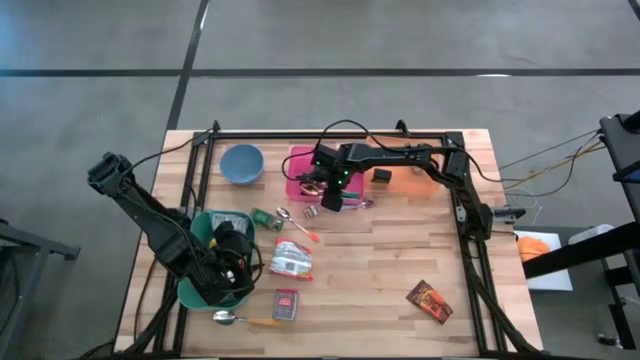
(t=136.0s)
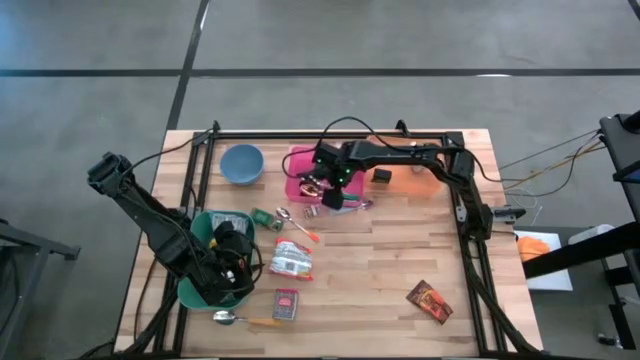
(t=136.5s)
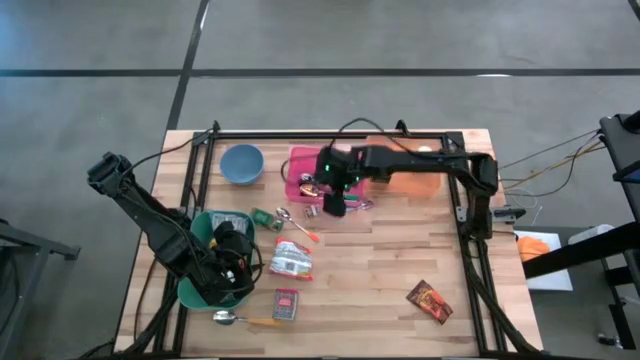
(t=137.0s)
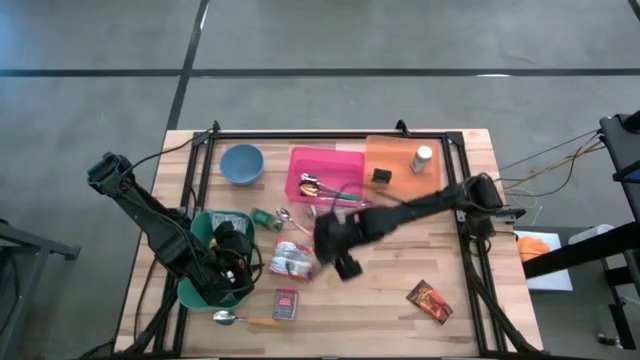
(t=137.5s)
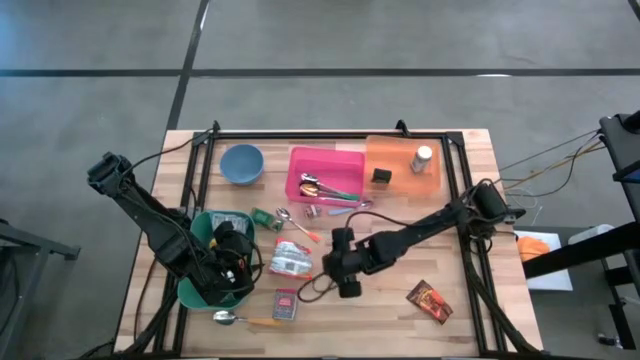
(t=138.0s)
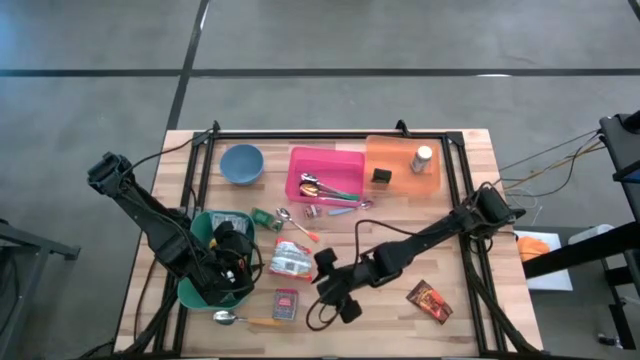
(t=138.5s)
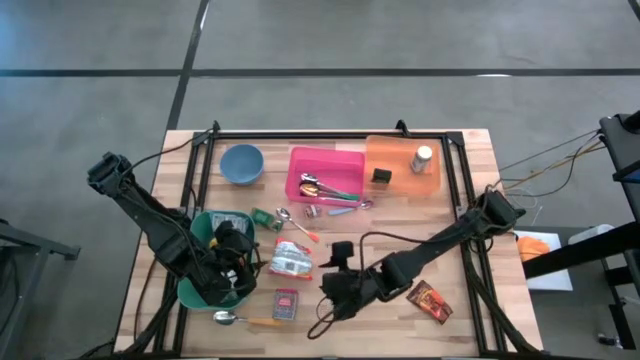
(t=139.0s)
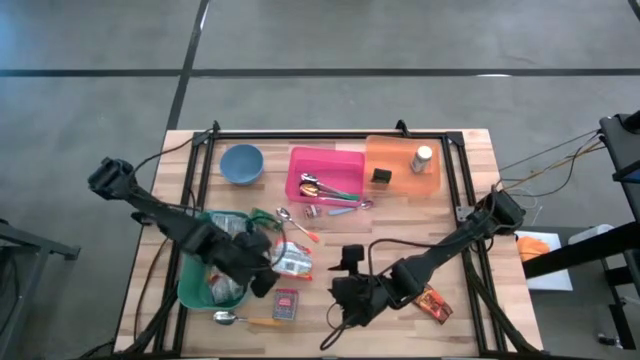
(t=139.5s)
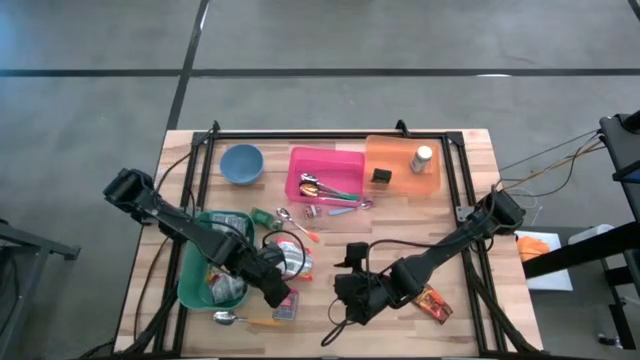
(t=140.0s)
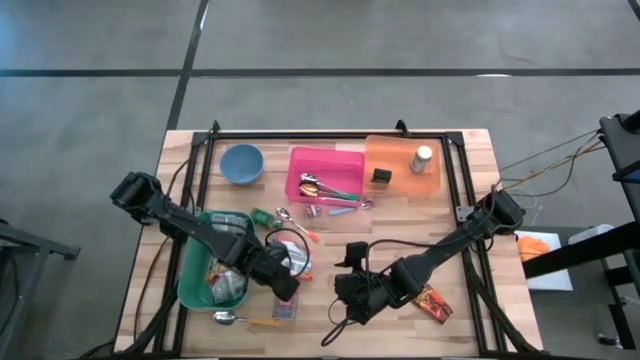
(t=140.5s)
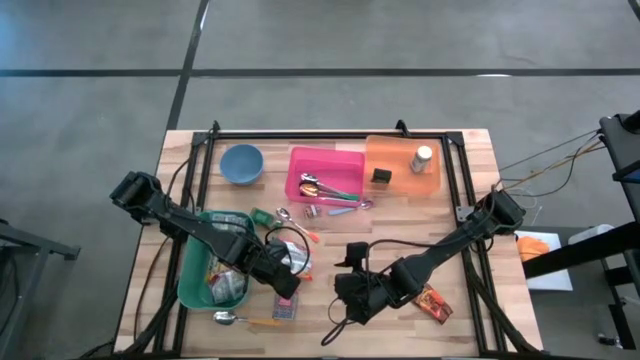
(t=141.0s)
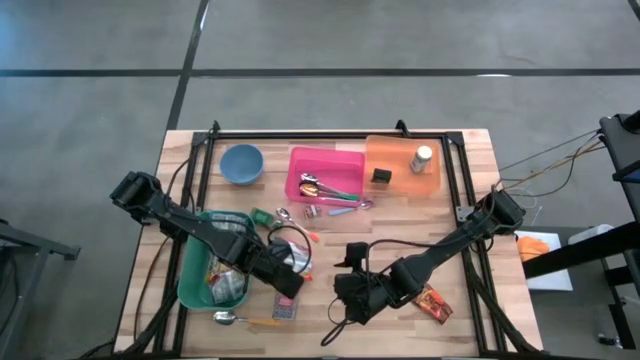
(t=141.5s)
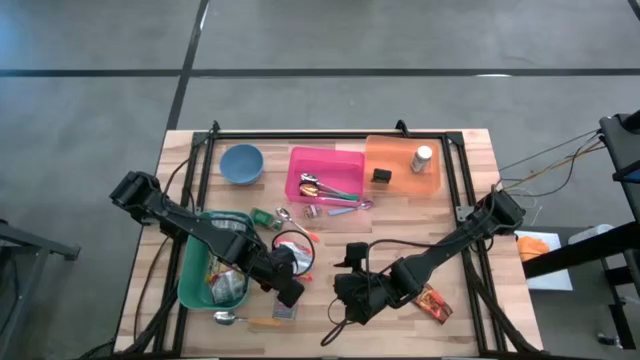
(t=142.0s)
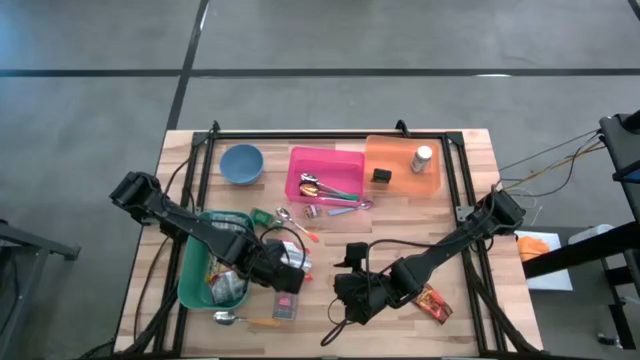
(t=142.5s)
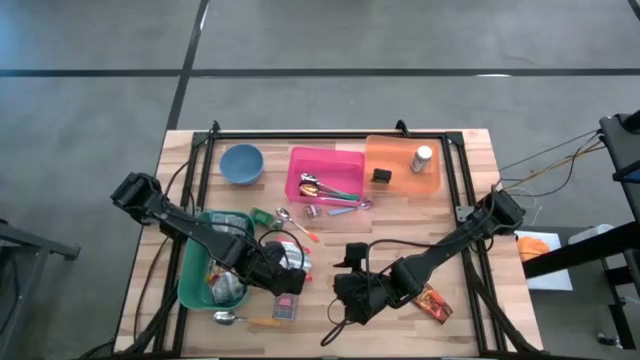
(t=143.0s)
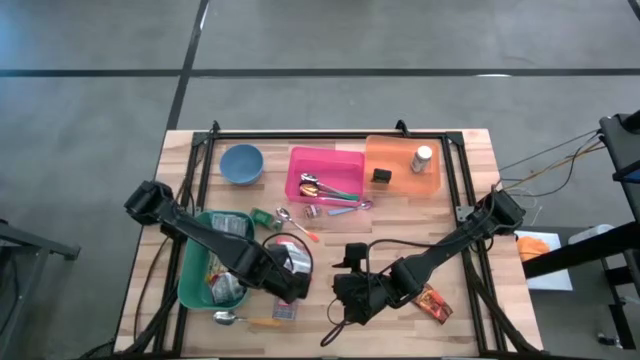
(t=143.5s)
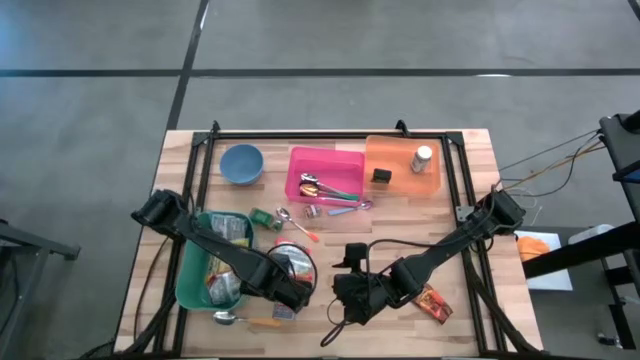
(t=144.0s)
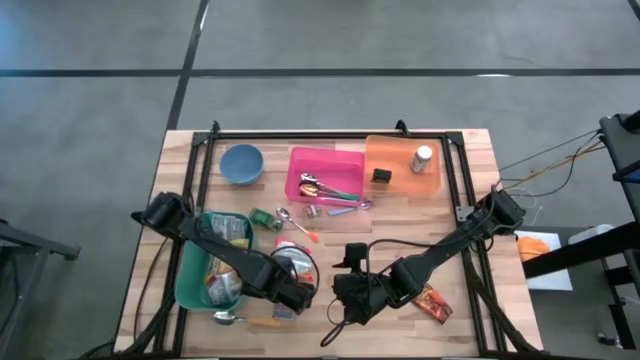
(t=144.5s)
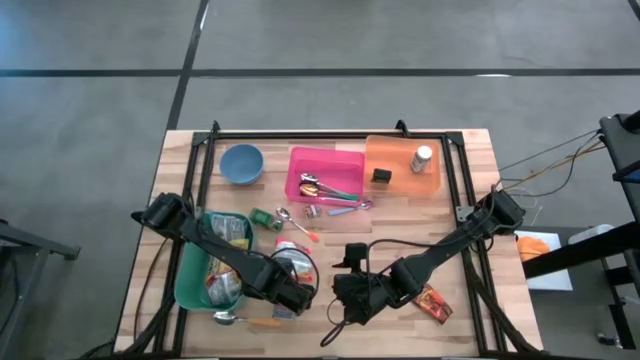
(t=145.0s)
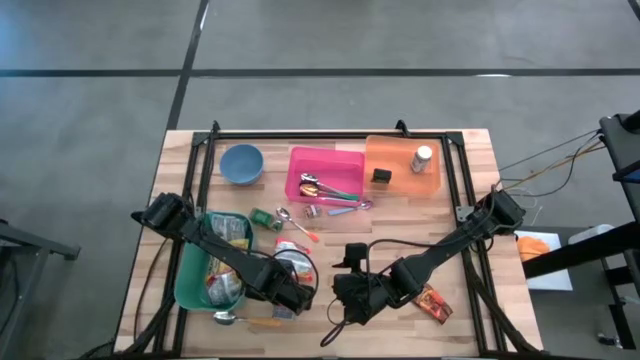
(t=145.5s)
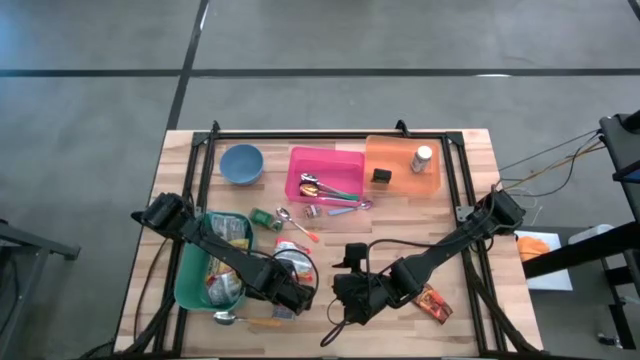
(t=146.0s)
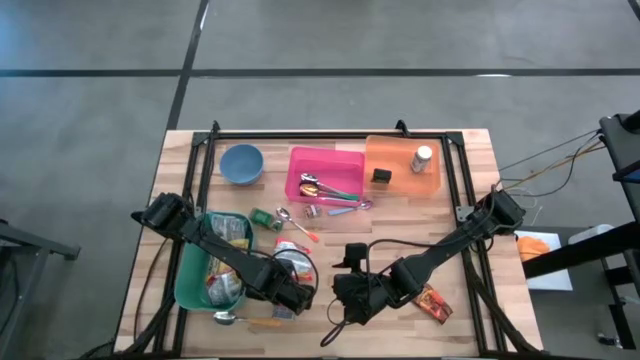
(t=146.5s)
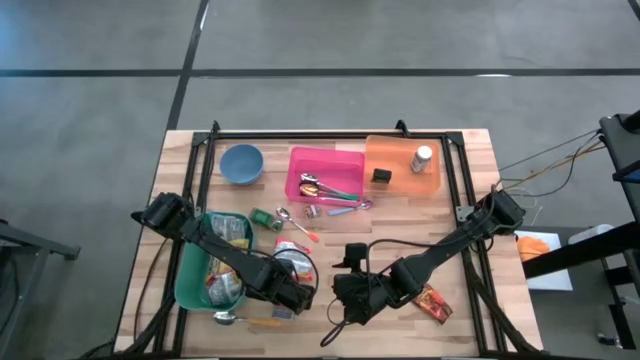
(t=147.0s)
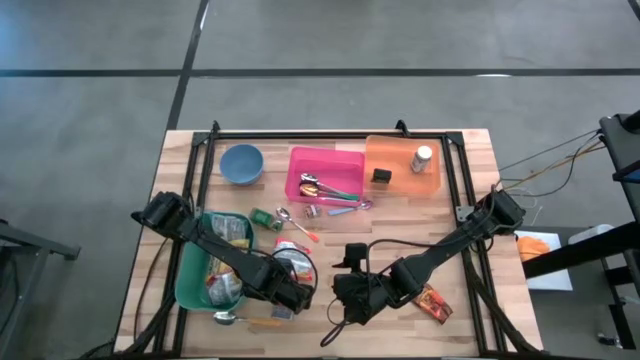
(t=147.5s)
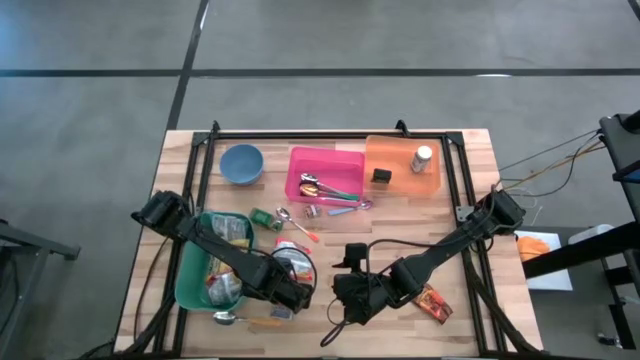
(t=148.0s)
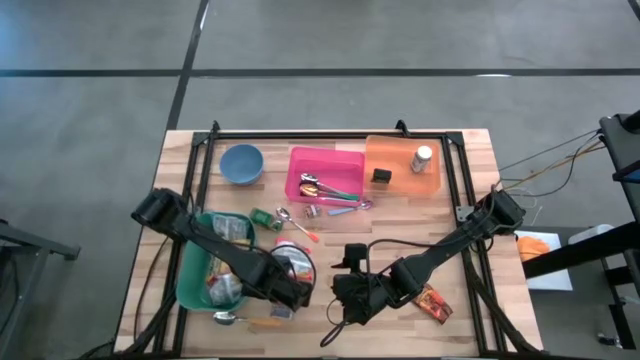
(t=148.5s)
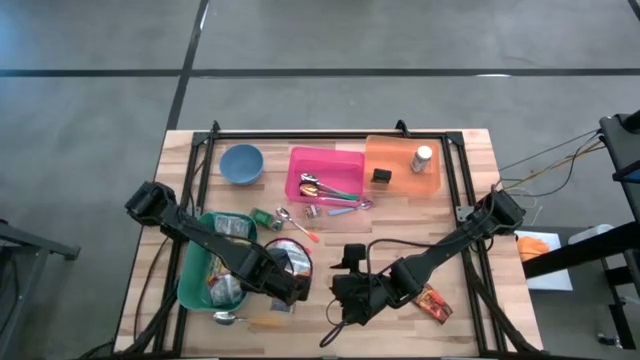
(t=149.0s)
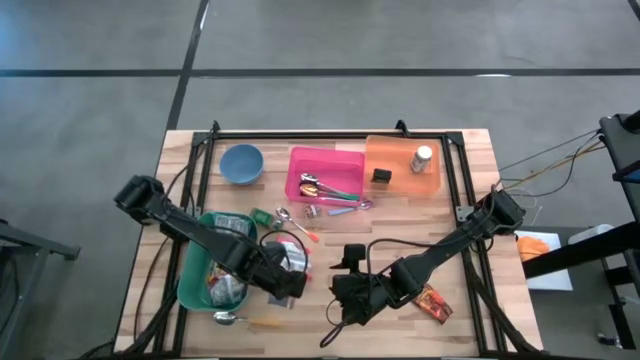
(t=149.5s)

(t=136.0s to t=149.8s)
Put the red spice can into the orange bin
